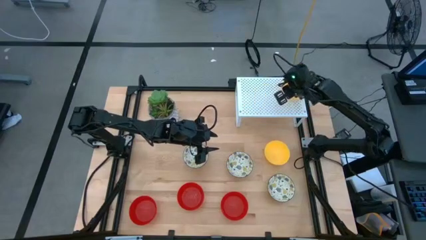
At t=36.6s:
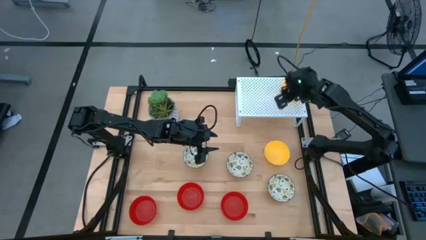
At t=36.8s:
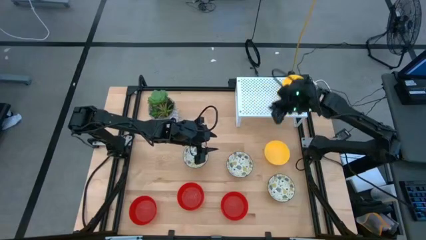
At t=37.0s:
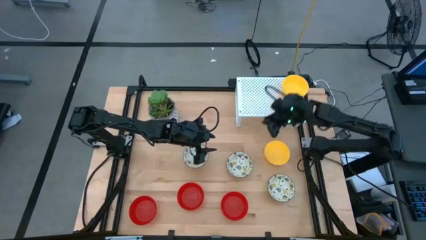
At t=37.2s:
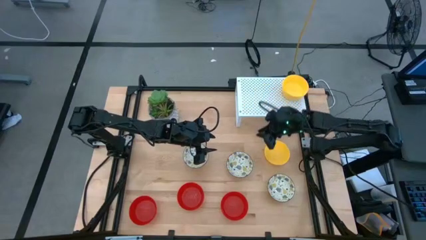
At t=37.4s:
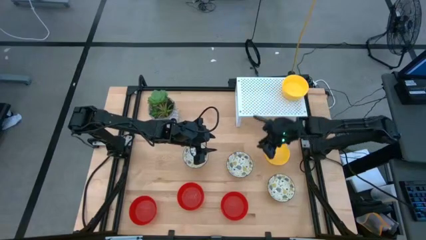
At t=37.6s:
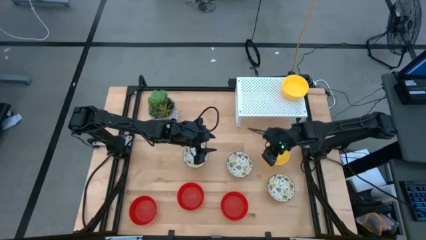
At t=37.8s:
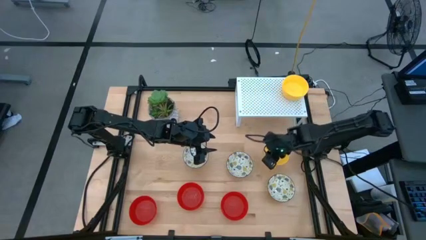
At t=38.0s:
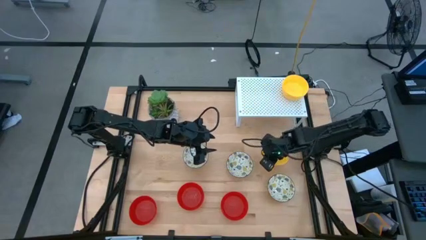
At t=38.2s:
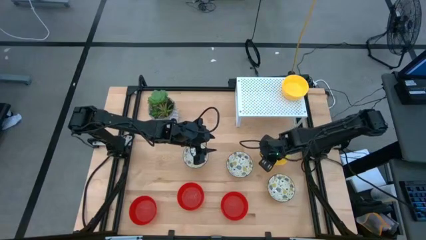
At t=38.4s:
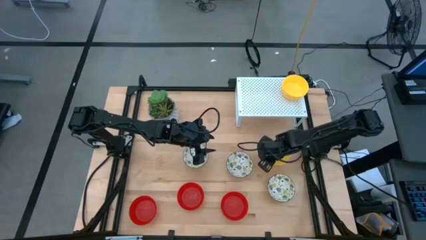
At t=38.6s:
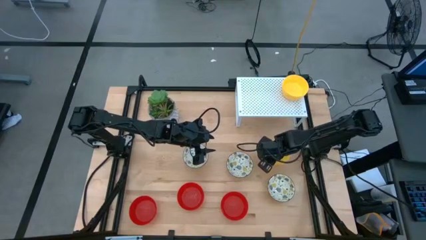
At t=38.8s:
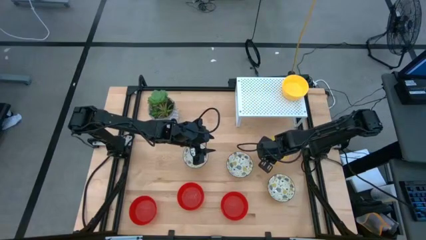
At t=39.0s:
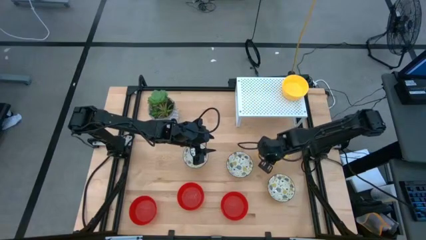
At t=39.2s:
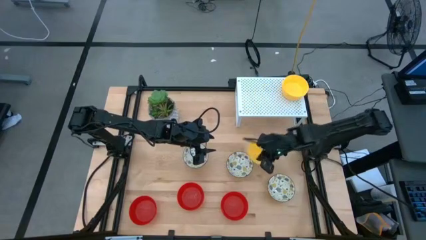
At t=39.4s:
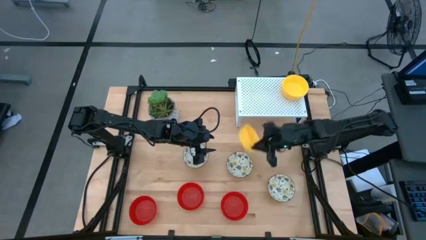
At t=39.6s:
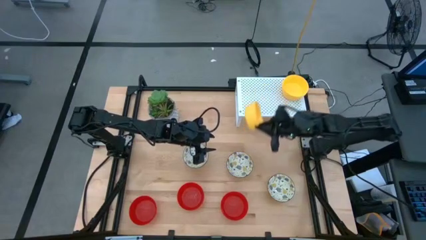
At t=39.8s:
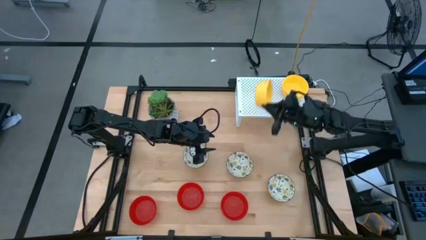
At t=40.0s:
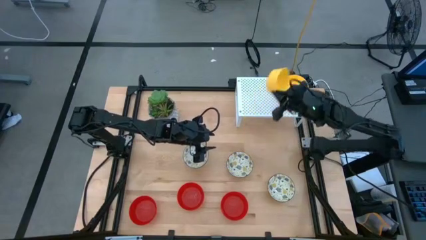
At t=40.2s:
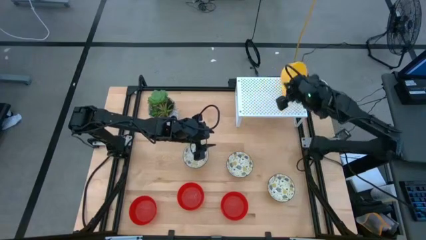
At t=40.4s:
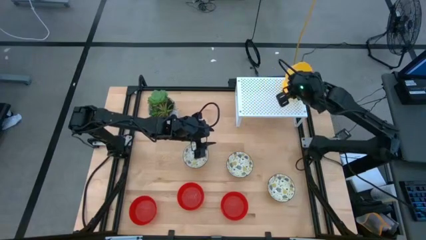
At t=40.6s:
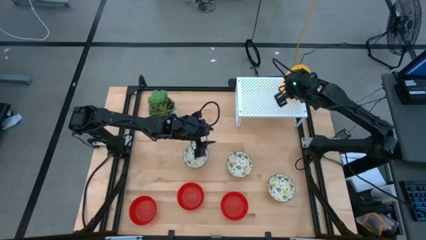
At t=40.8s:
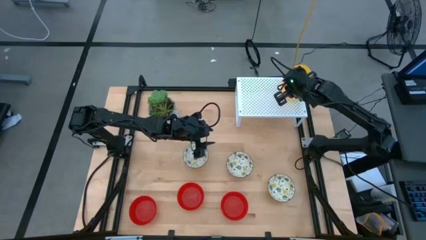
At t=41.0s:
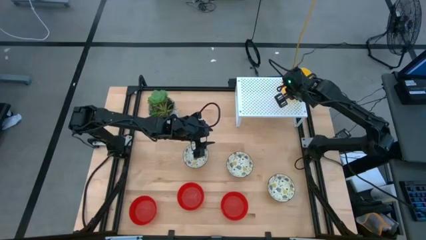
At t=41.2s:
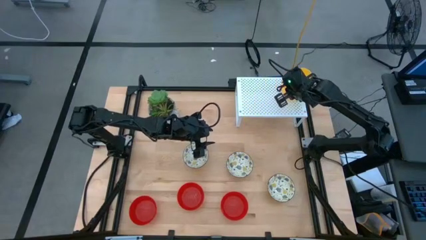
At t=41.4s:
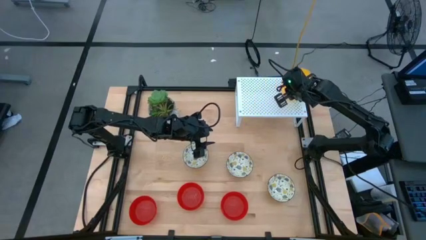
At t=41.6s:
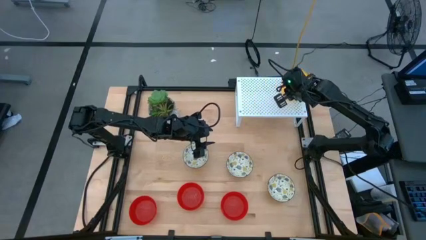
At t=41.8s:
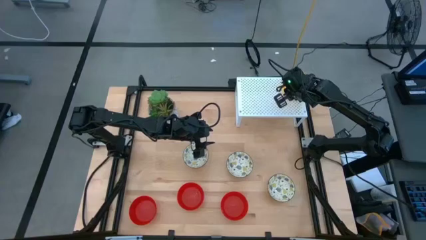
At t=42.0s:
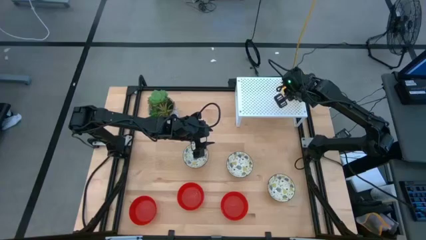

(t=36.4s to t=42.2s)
Task: Pick & Place Mini bowls
Stack the yellow bowl on the yellow bowls on the shelf

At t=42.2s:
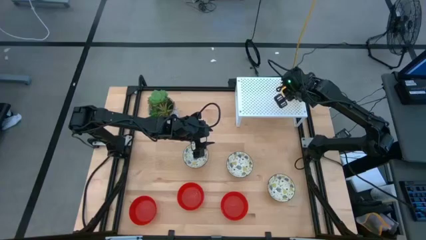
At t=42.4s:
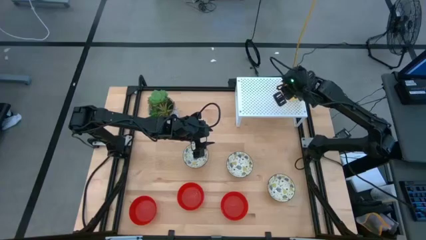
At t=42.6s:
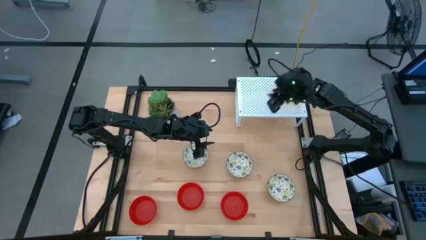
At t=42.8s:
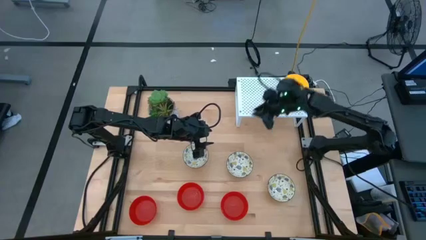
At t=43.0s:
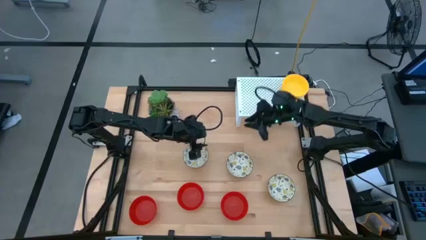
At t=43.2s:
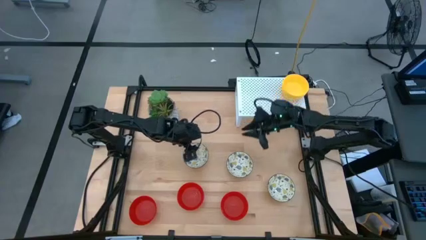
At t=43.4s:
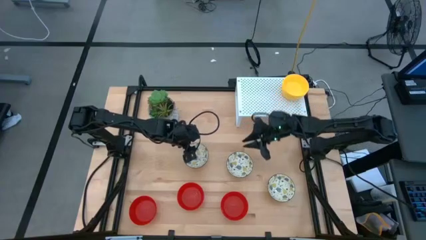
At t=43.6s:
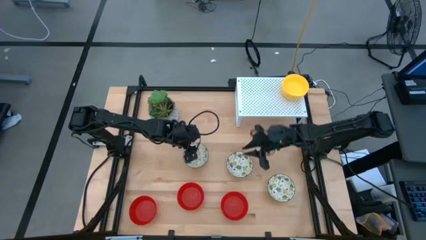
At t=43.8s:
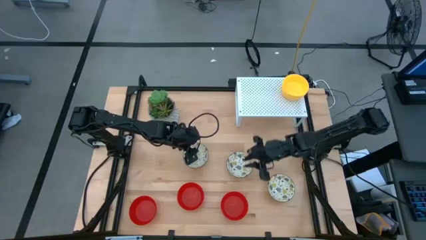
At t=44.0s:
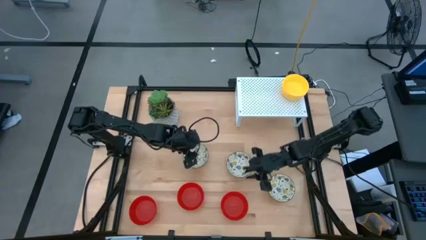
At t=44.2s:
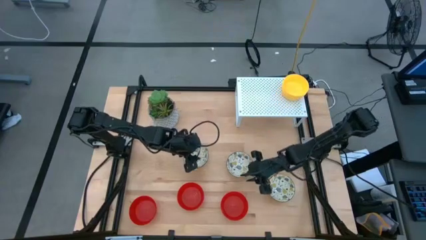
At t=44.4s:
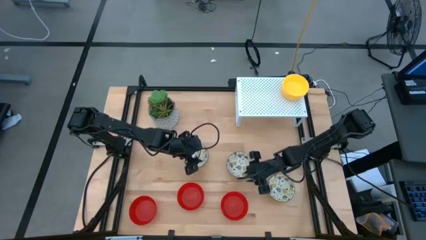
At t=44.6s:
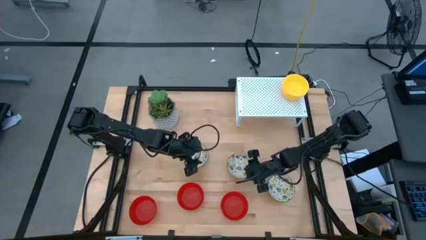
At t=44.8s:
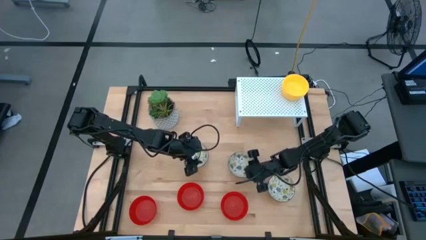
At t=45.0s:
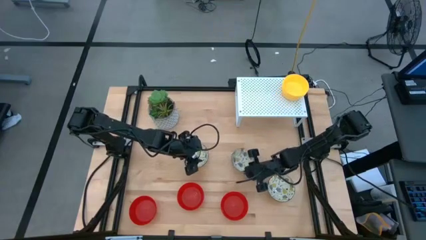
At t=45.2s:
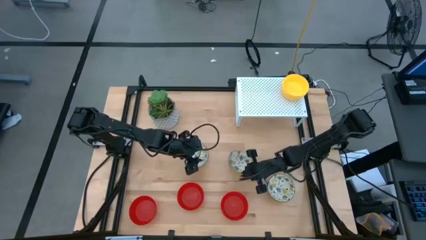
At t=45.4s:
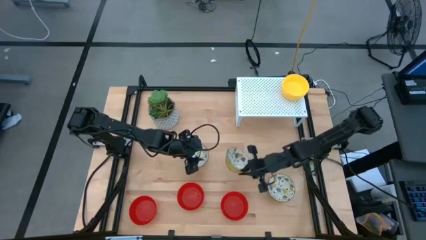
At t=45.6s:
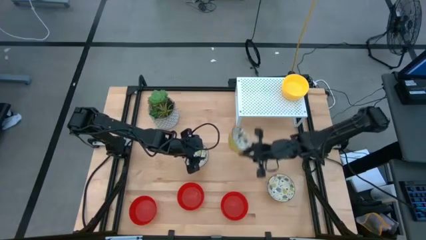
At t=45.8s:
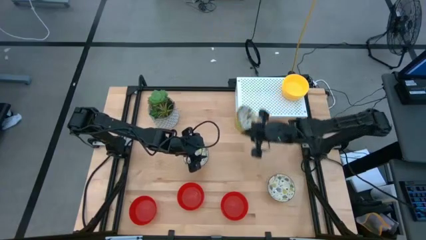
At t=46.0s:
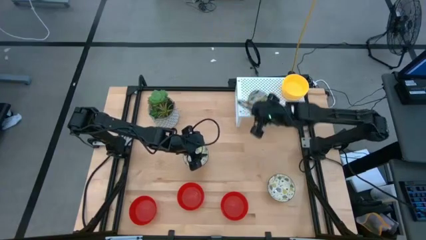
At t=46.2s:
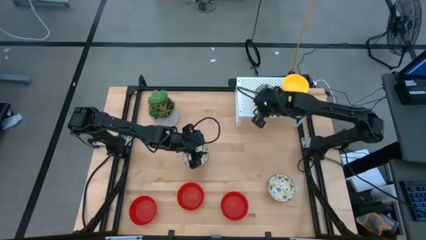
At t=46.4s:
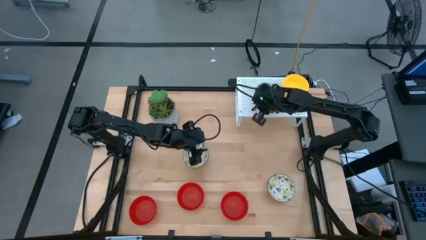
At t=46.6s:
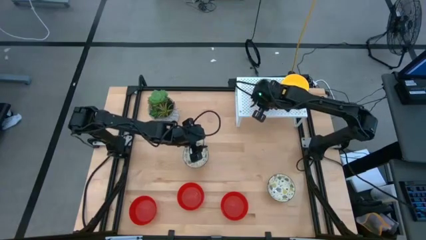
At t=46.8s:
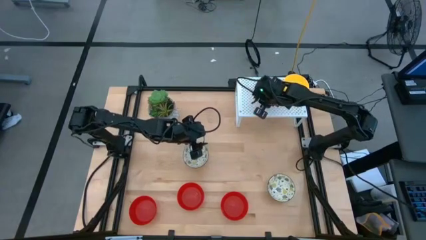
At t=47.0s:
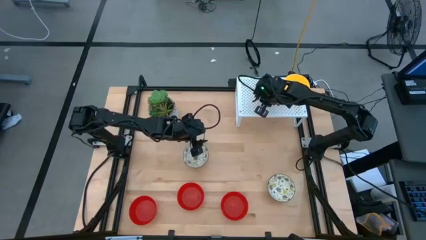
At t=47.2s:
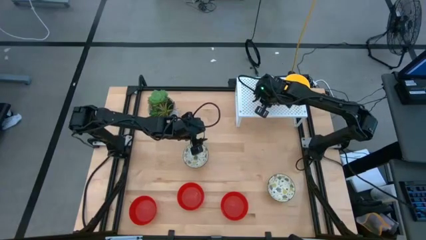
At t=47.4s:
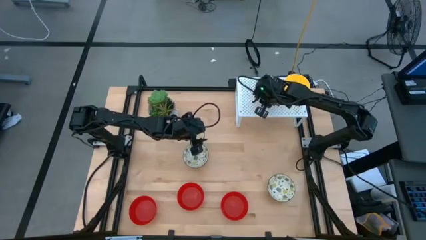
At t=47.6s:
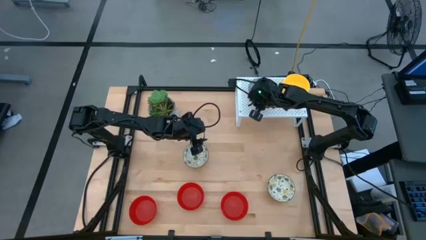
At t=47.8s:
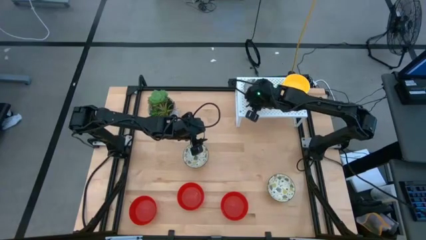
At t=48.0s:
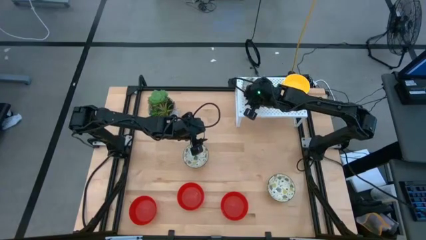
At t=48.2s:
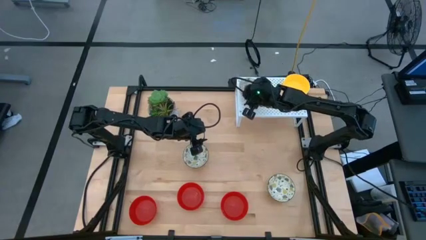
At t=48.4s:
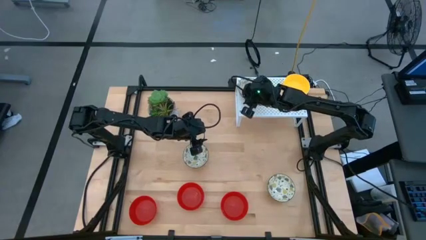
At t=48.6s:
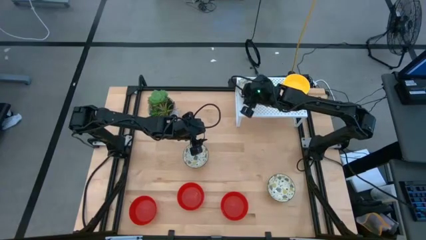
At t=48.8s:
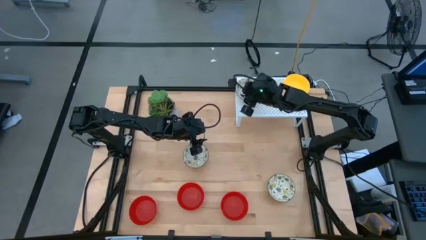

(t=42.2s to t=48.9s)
Put the white patterned bowl on the shelf

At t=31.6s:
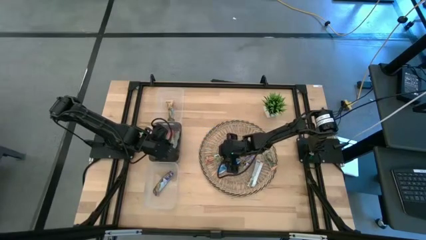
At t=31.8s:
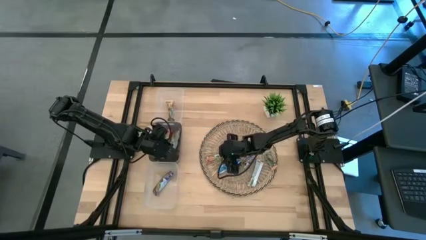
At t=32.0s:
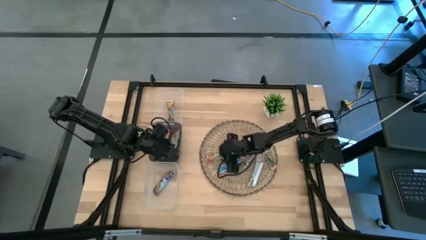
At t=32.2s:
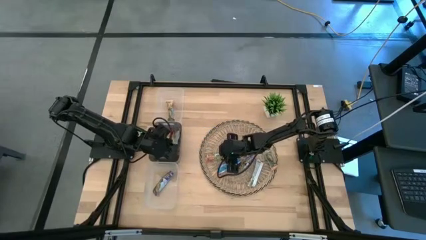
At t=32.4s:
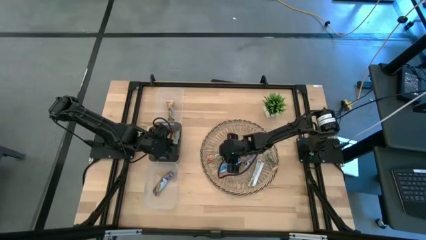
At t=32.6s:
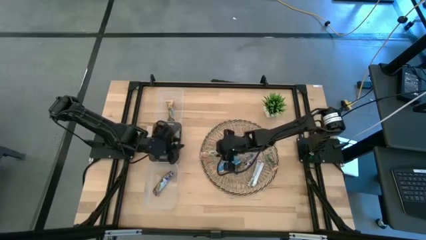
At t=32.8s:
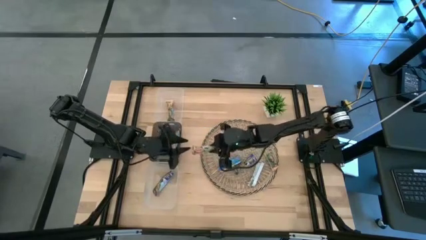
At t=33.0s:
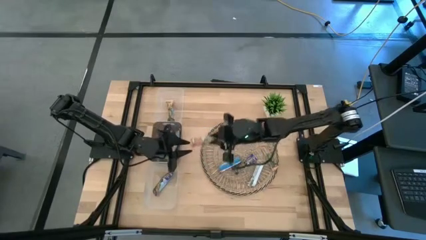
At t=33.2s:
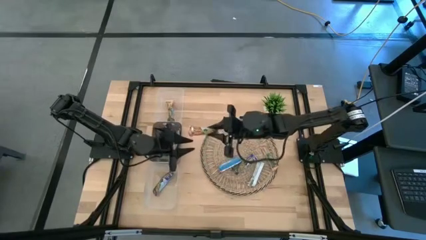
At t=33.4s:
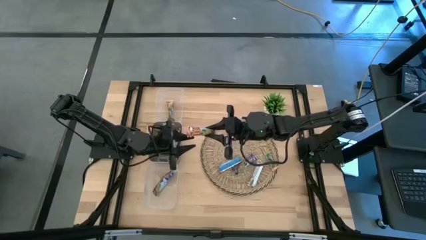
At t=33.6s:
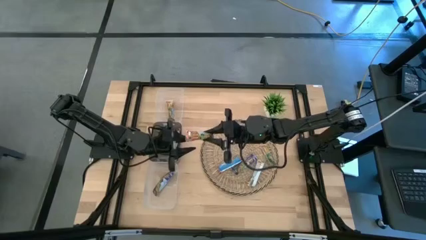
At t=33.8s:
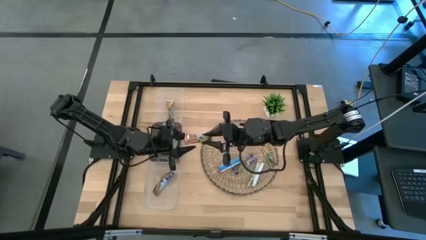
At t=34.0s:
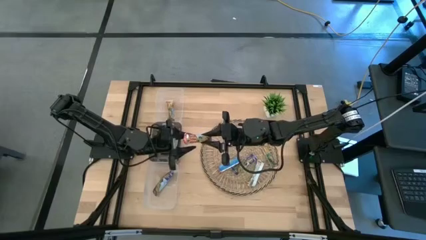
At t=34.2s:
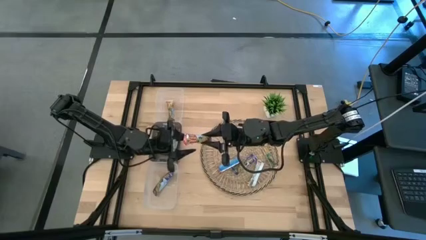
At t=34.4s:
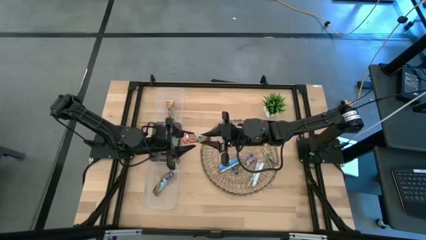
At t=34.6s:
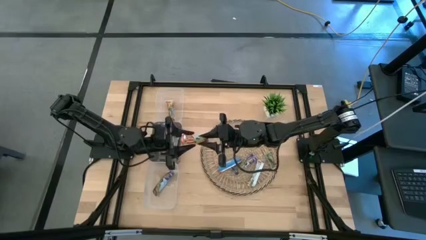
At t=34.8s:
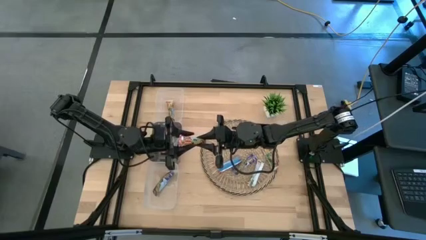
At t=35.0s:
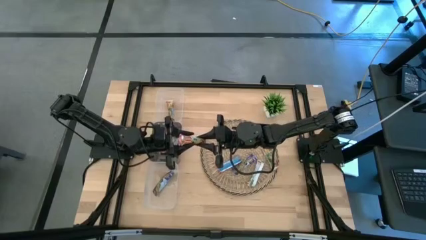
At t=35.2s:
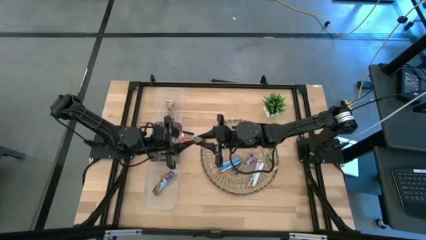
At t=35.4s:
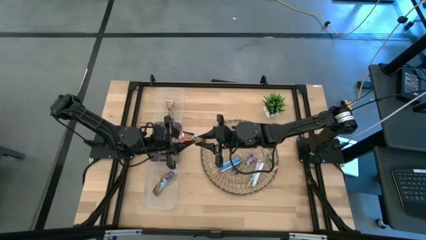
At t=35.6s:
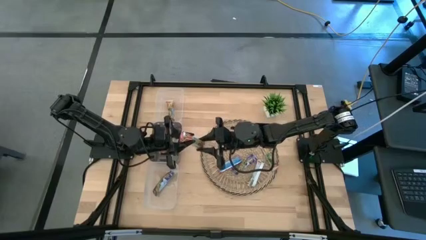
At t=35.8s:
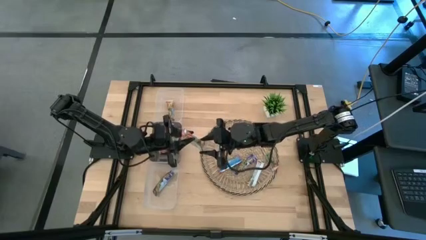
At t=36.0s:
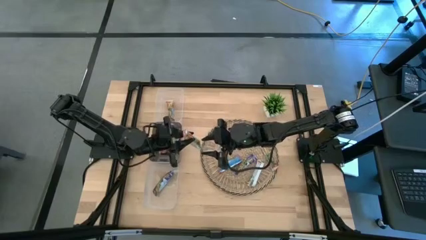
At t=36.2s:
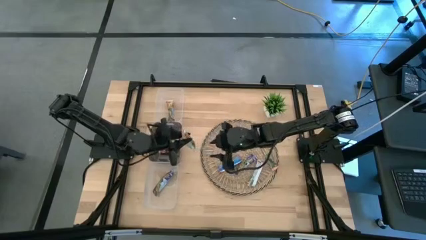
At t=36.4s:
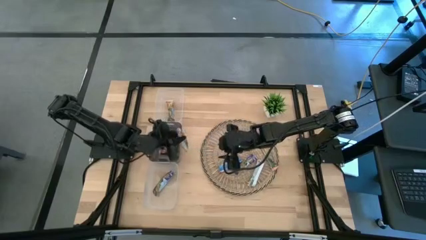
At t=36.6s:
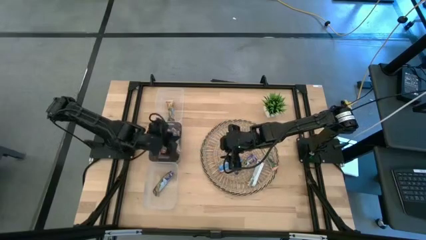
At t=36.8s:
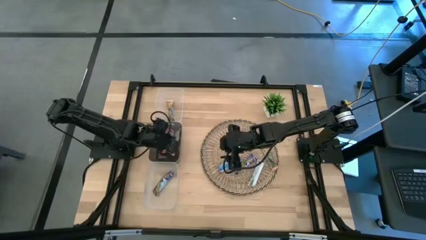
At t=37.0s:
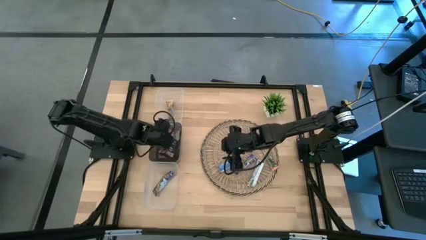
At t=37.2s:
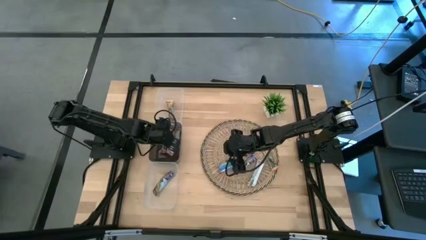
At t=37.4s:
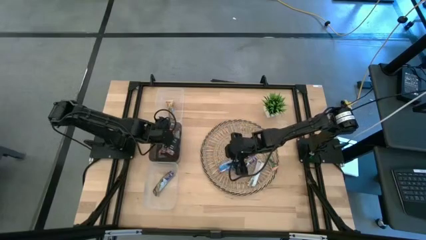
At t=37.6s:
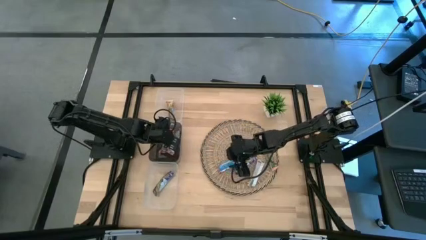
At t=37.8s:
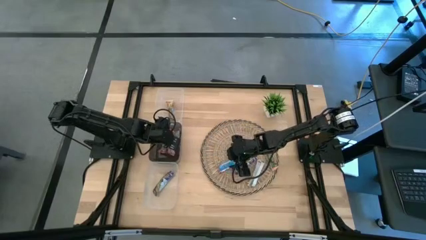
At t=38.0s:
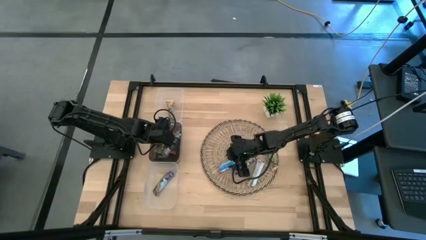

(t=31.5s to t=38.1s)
Task: Pick and place Granola Bars by type
Put the red granola bar into the black bin
